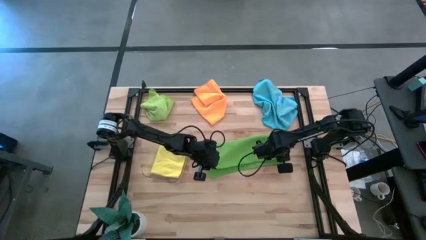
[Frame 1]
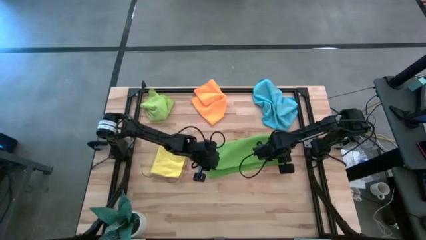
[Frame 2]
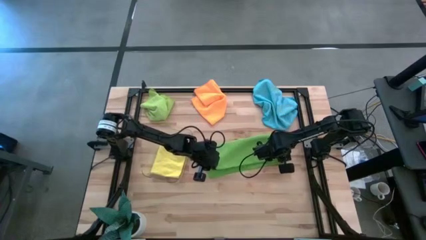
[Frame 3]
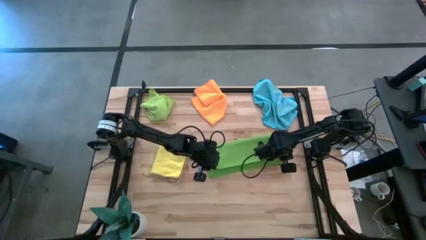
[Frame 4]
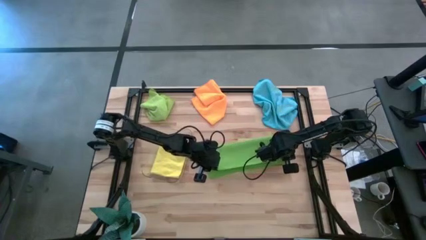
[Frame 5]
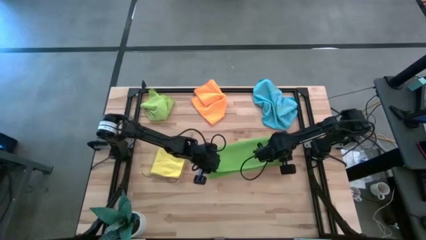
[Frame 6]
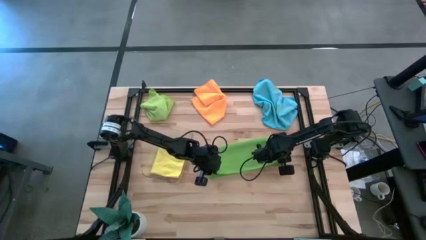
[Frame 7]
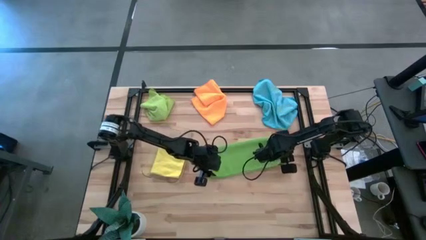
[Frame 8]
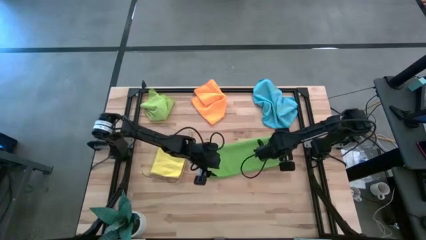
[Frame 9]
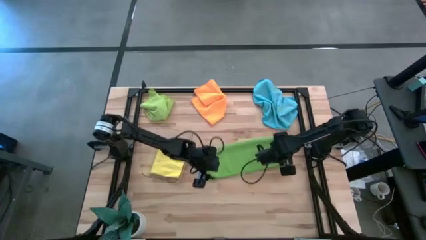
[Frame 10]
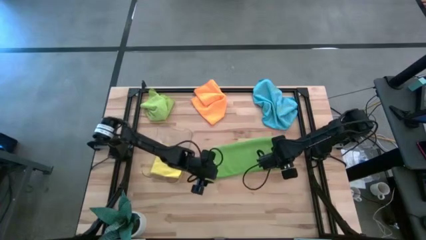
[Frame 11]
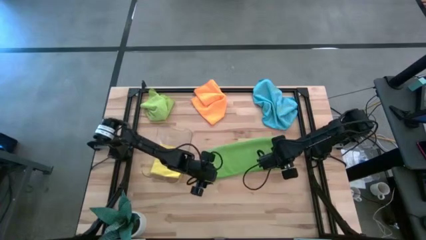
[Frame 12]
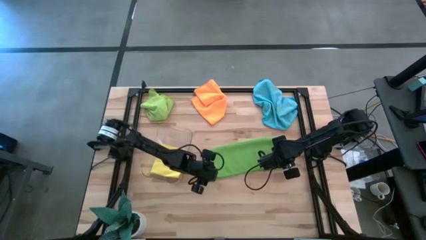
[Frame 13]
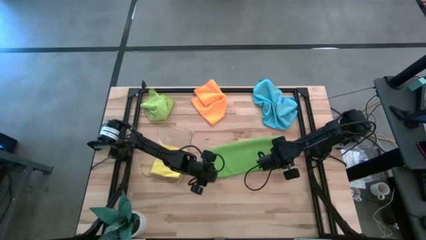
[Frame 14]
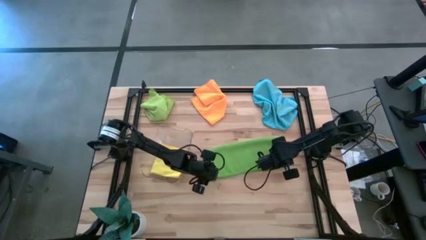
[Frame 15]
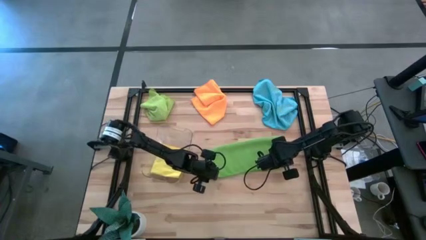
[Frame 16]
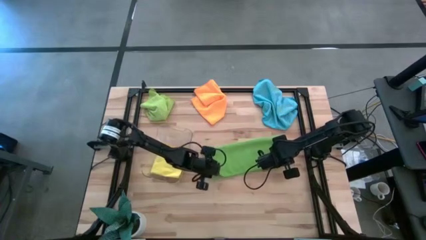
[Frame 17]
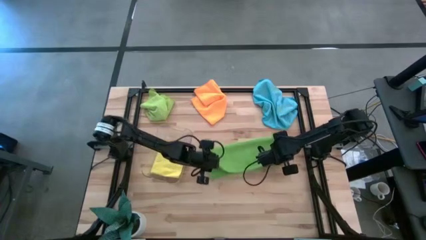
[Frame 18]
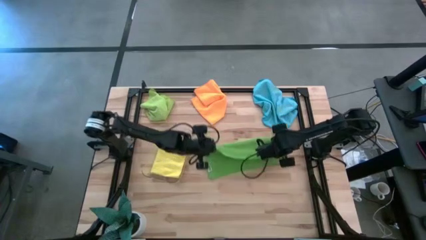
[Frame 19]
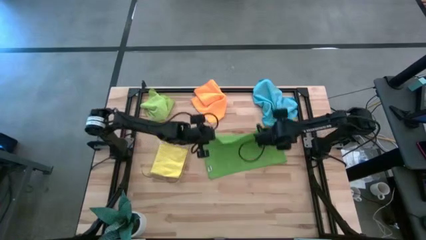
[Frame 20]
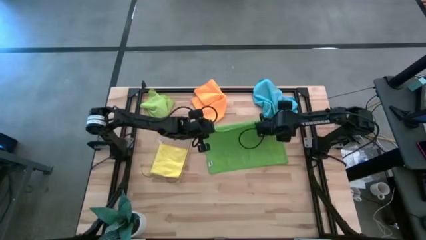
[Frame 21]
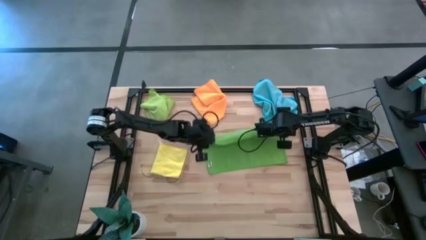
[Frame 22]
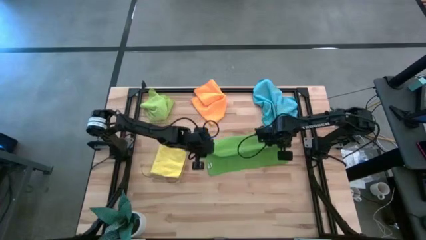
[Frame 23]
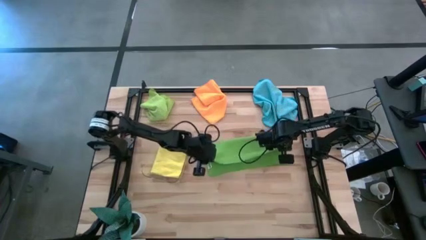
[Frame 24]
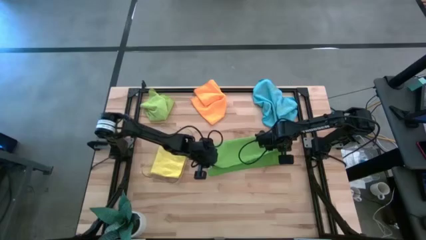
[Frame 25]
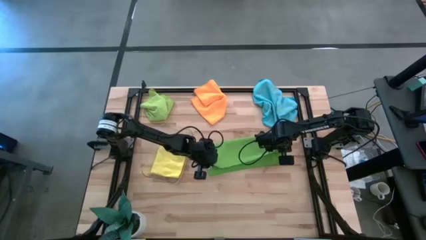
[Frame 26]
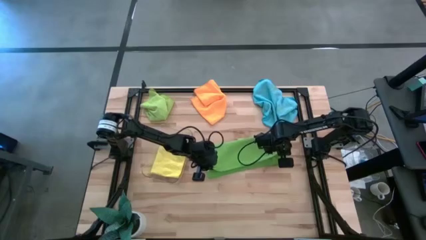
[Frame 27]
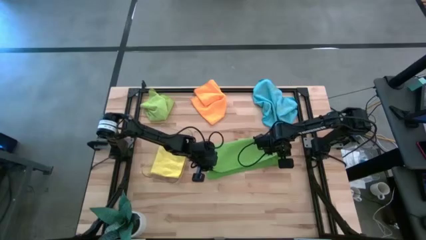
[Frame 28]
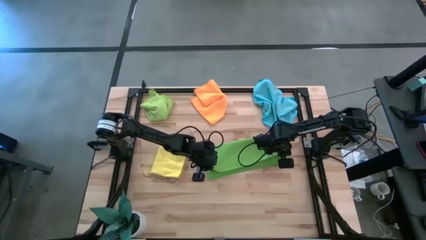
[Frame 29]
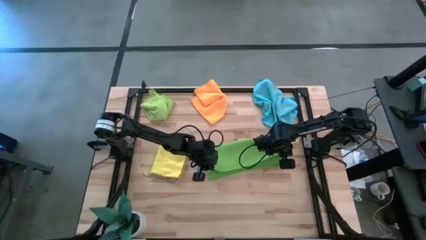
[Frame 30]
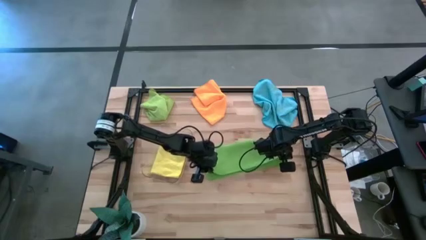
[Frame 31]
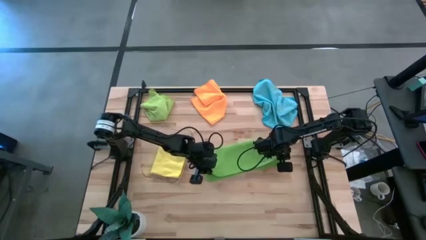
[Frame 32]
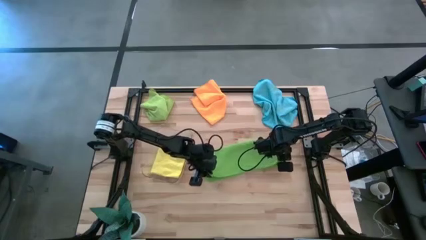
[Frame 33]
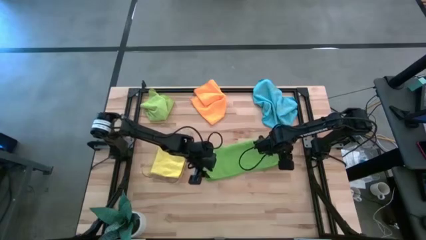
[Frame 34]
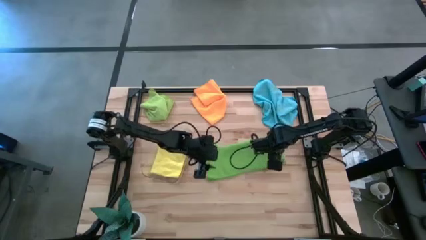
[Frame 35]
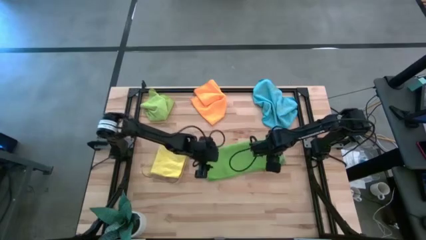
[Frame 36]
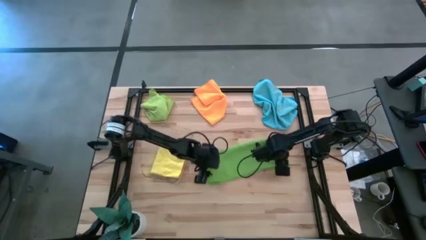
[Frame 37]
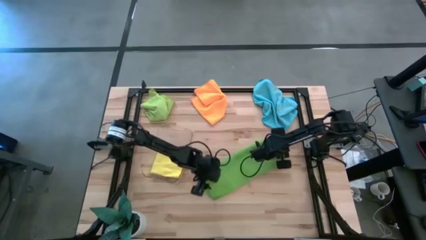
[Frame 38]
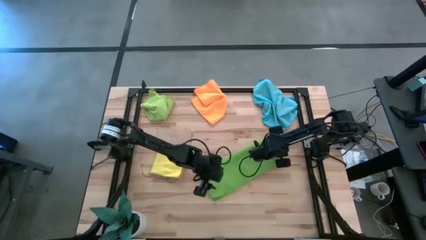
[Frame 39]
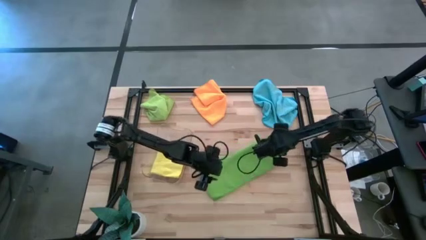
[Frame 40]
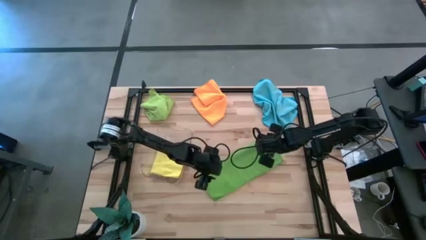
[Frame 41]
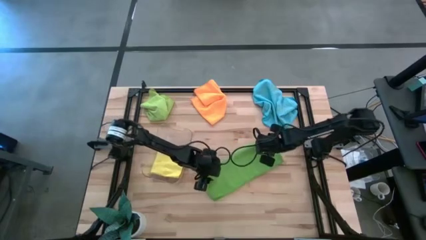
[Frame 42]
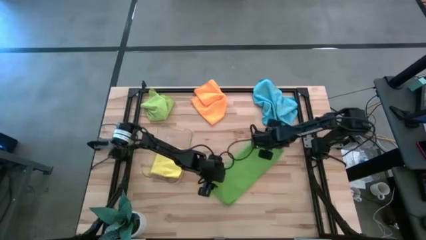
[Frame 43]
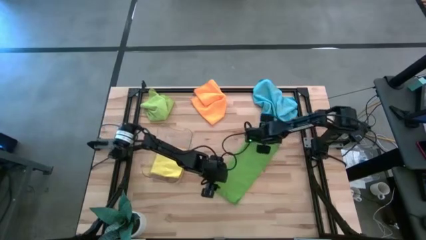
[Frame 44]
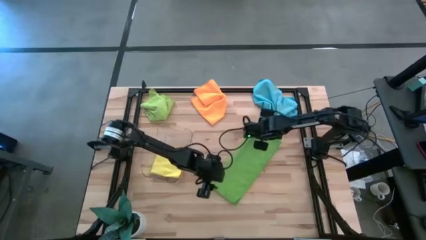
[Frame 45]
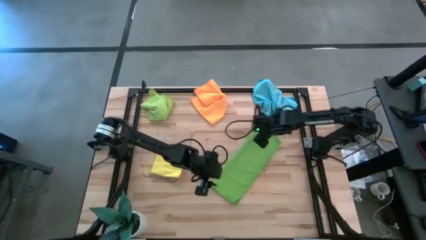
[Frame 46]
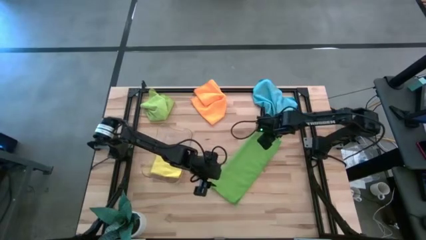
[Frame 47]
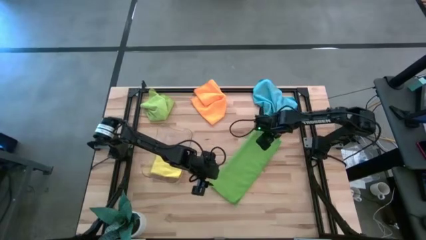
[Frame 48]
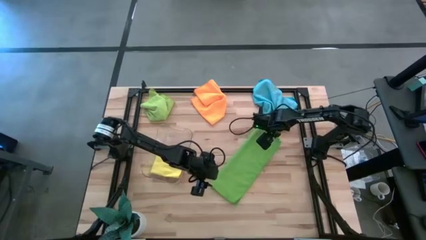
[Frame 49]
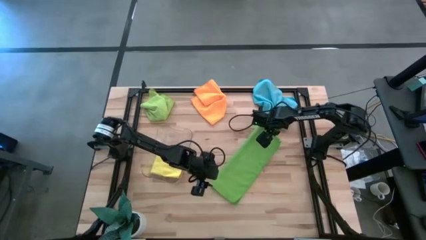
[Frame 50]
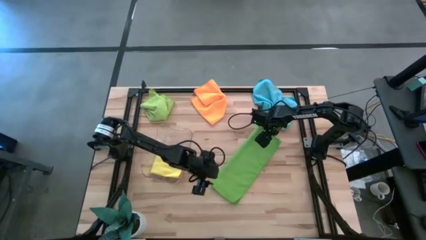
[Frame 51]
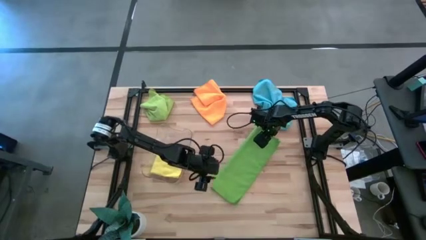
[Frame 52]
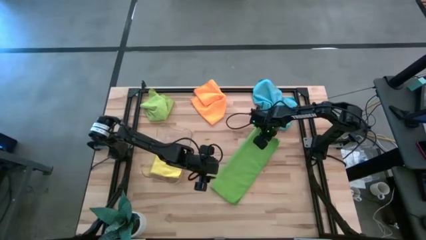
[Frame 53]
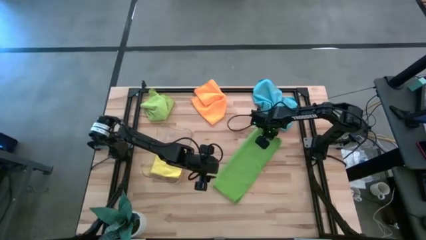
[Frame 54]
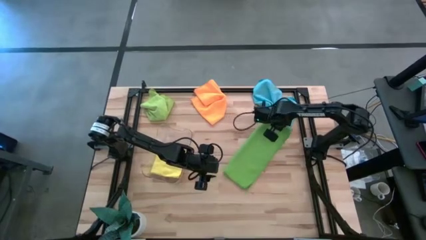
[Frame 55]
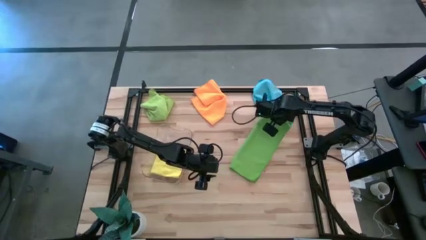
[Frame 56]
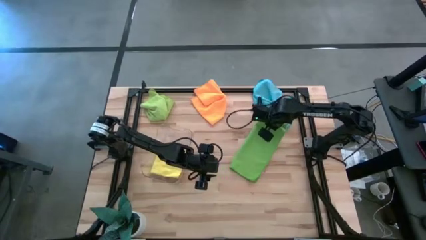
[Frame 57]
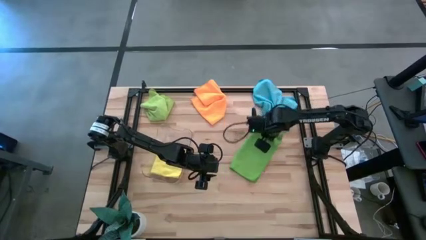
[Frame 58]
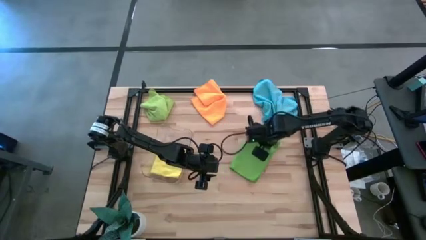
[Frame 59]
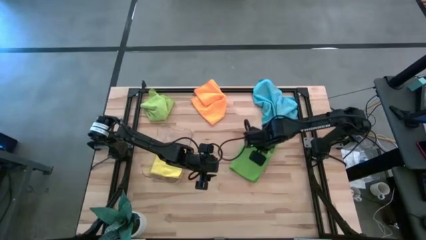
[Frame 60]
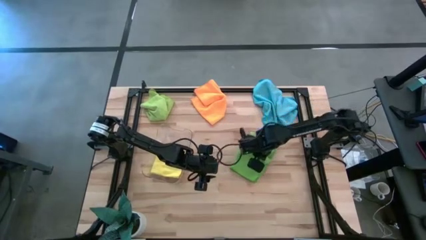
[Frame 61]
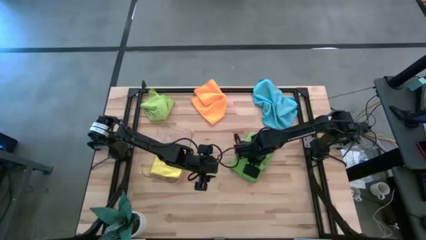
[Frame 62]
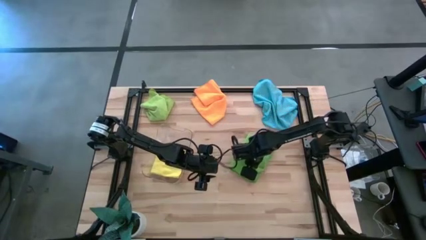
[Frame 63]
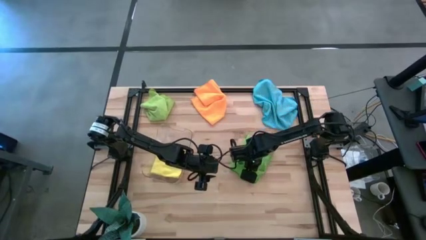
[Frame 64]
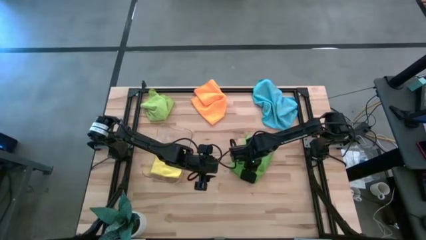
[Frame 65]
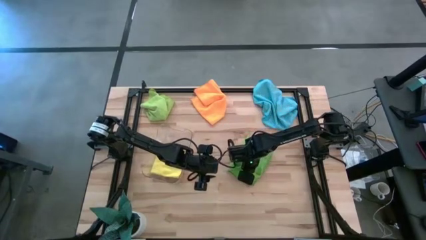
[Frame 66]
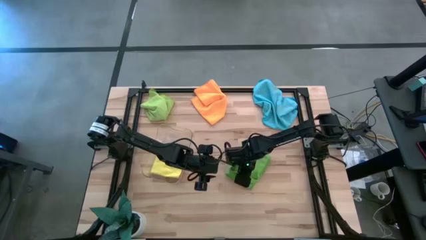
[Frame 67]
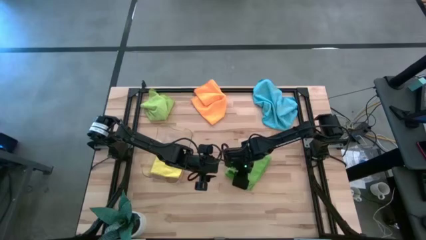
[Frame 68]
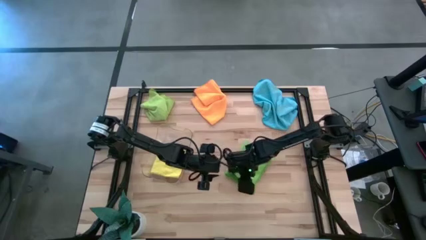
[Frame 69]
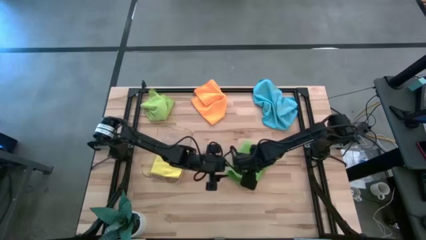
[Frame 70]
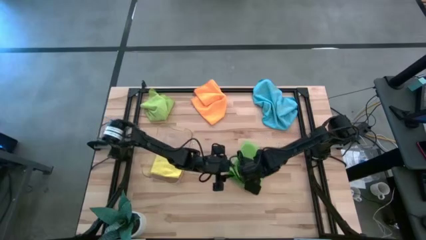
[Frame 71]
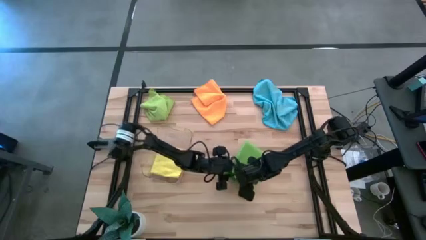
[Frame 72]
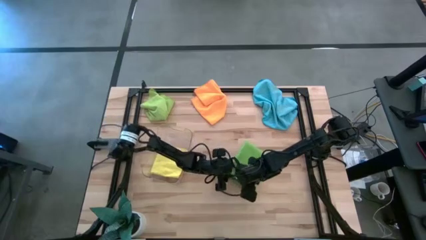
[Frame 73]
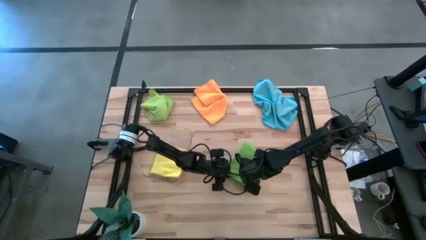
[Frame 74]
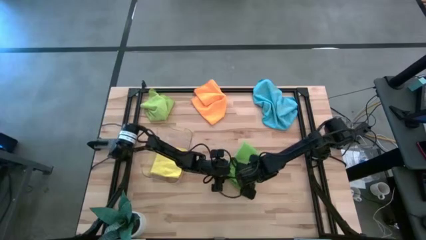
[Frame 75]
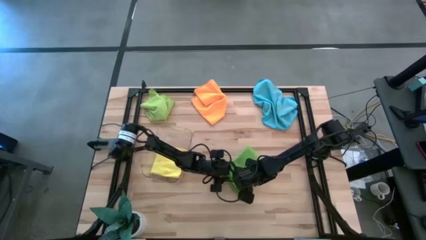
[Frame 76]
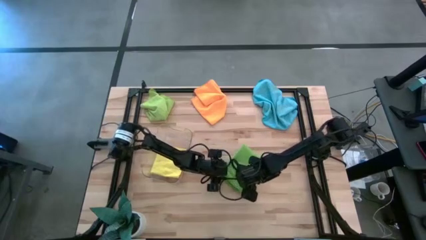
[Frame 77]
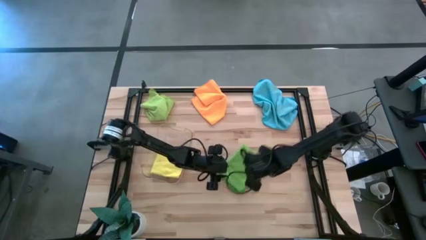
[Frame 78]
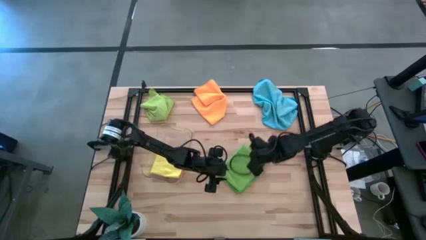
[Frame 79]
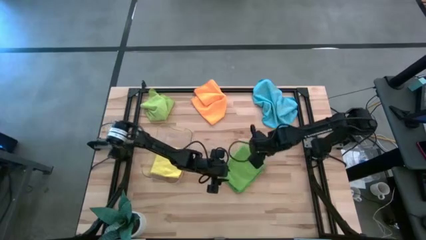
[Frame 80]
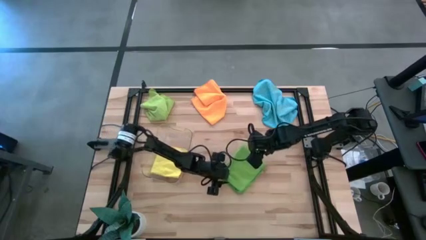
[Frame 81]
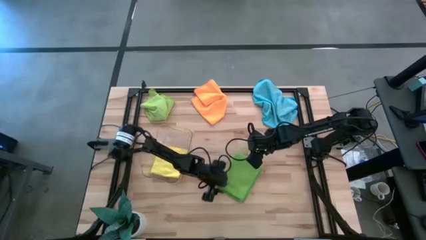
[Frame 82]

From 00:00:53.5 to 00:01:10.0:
Task: Fold microfiber towels
Fold the right green microfiber towel on the table
